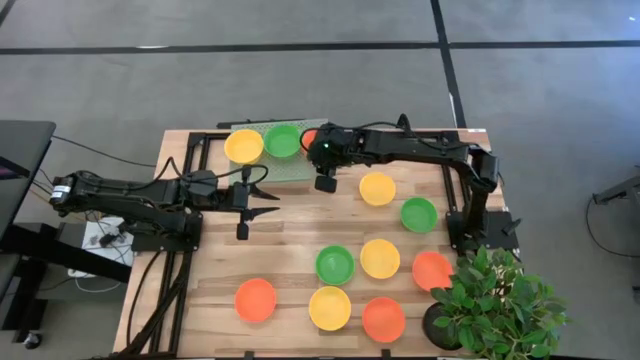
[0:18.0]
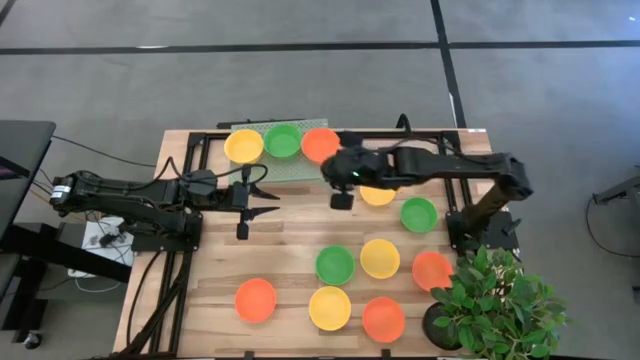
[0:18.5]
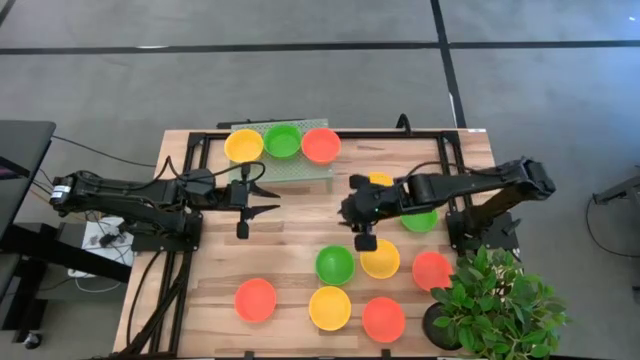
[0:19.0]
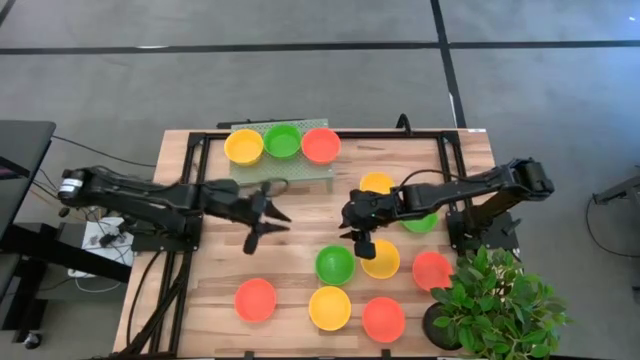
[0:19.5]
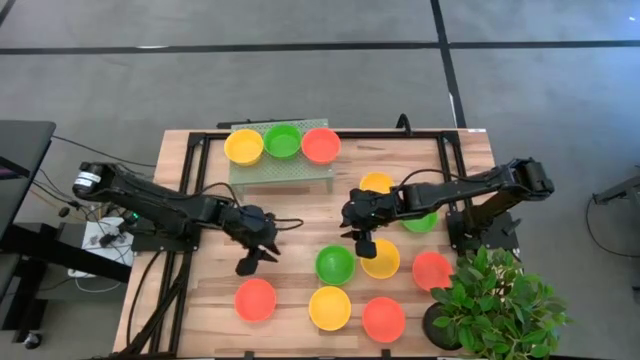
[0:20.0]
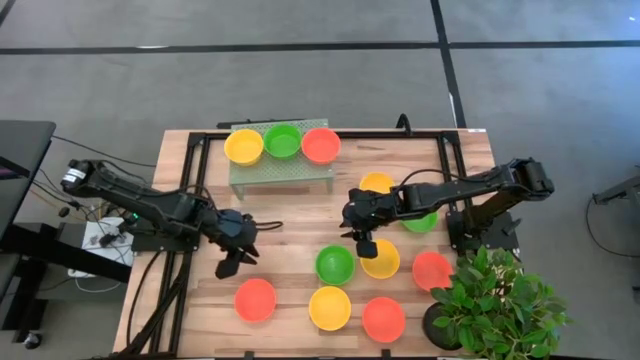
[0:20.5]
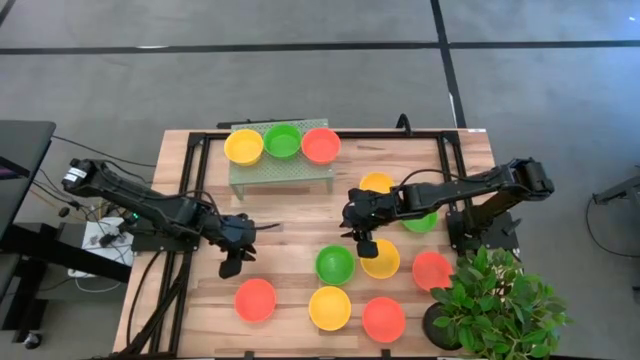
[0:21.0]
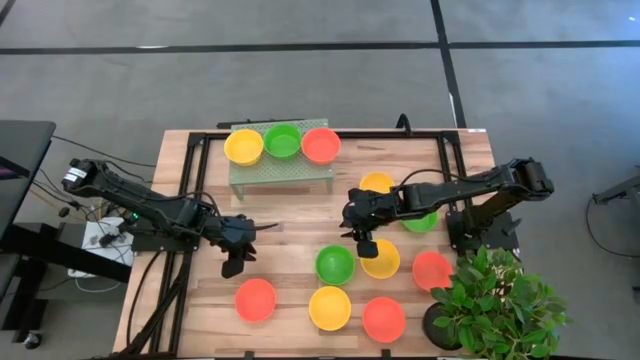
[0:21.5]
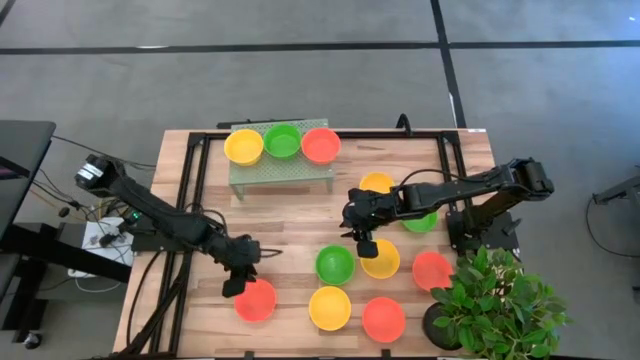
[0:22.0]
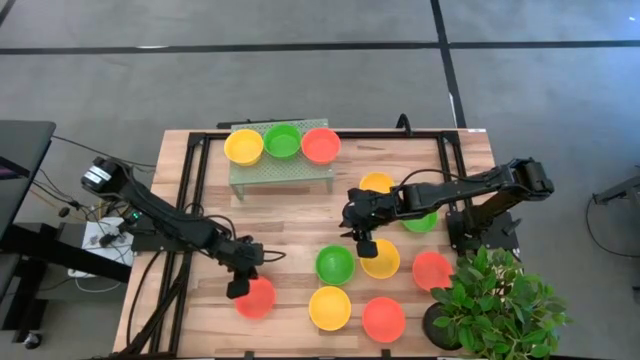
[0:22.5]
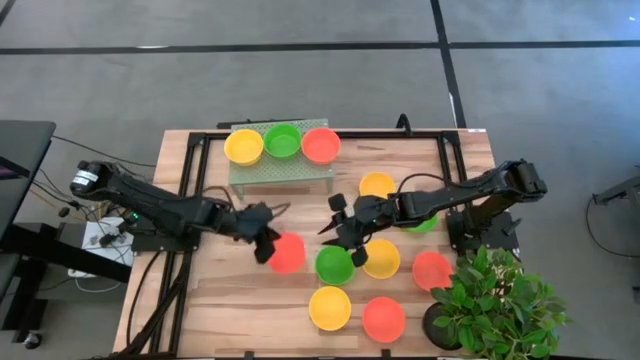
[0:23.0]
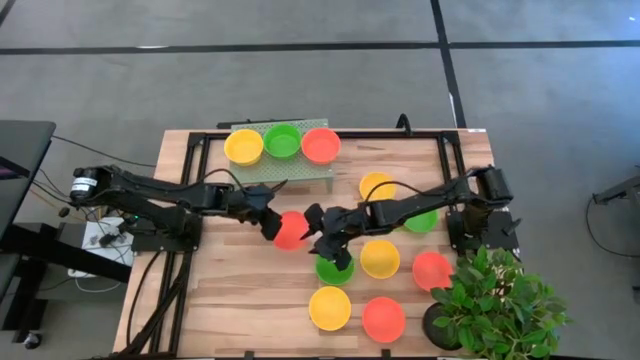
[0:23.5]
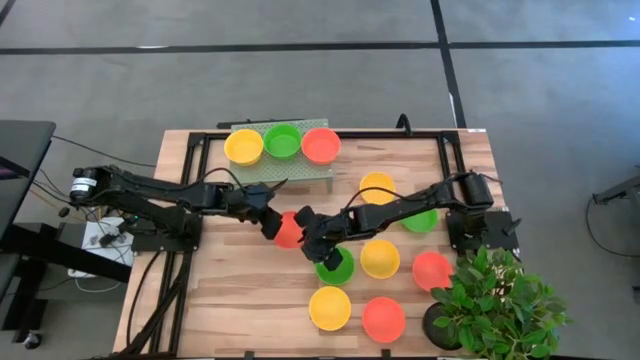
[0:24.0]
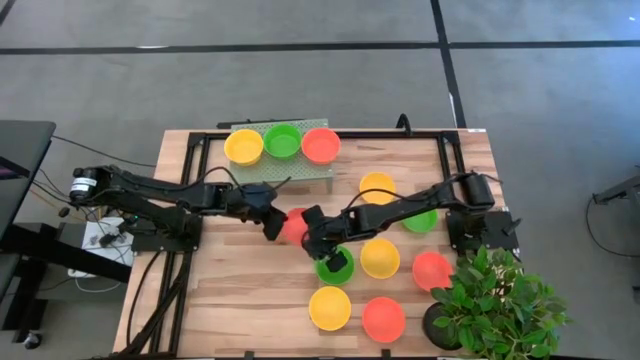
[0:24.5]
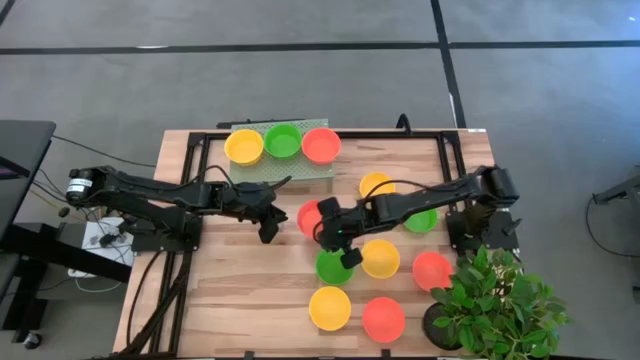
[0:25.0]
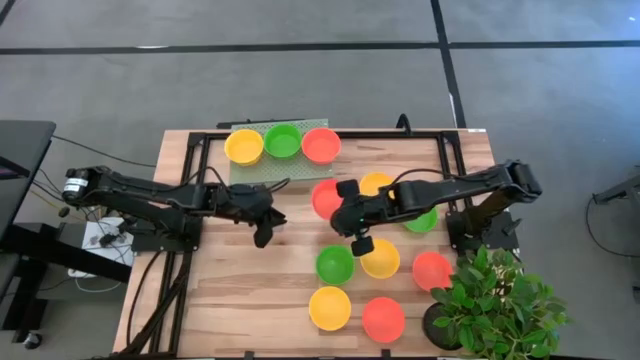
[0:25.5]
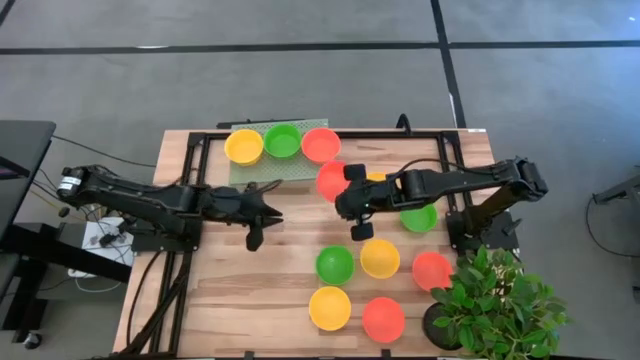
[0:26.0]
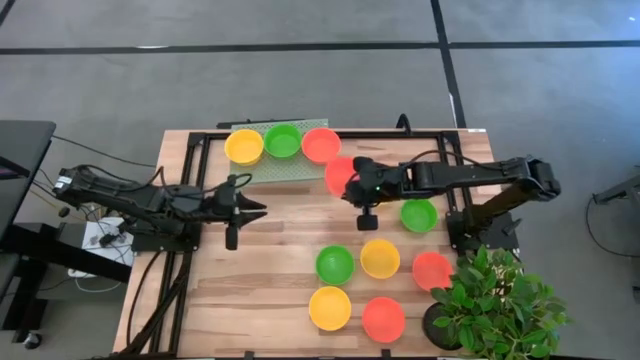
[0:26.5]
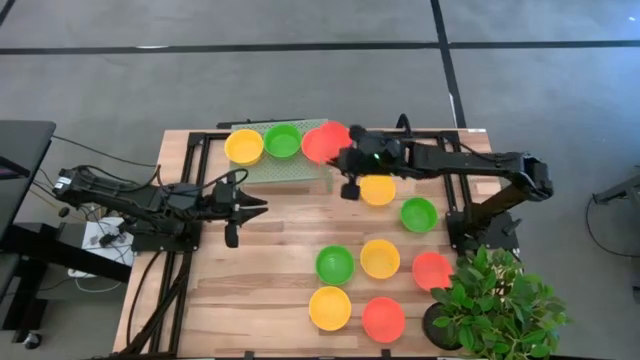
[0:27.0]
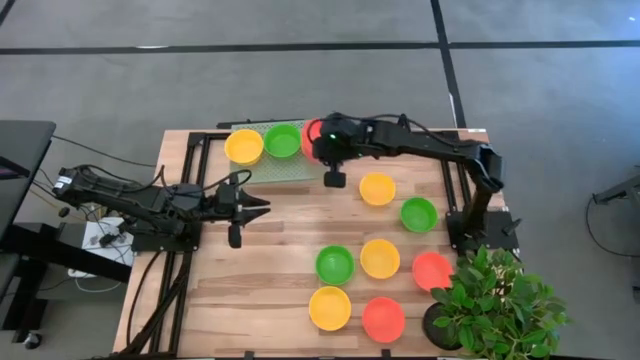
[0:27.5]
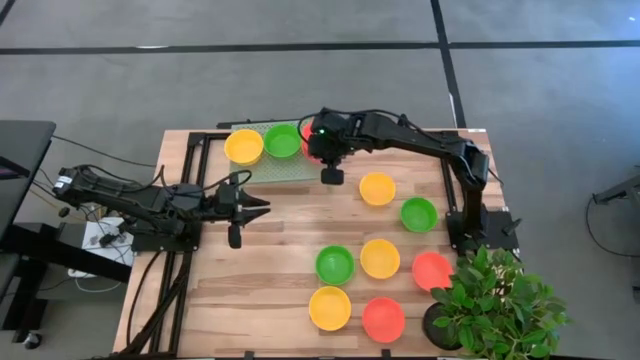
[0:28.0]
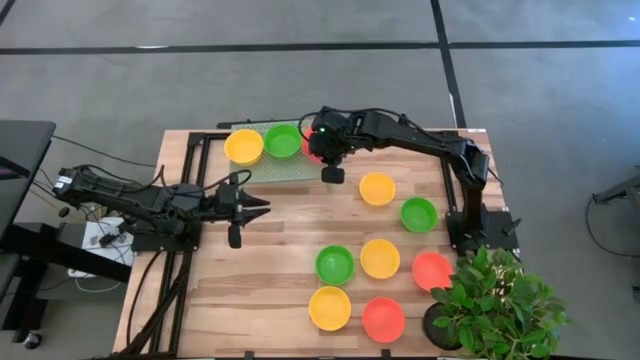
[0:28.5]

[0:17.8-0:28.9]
Task: Pick & Place Mini bowls
Stack the orange bowl on top of the other orange bowl on the shelf

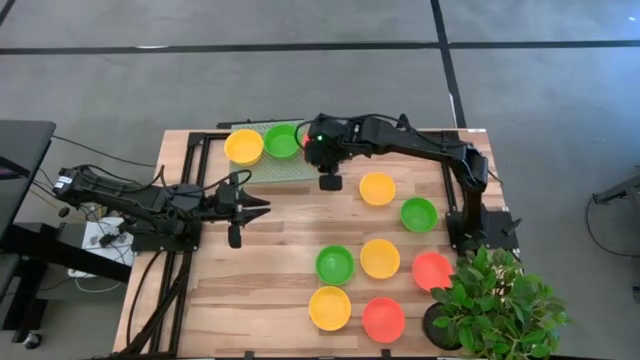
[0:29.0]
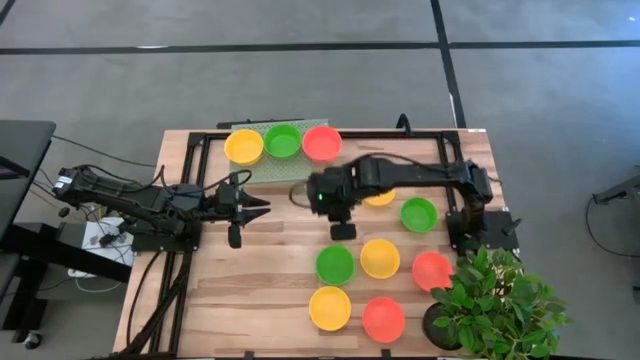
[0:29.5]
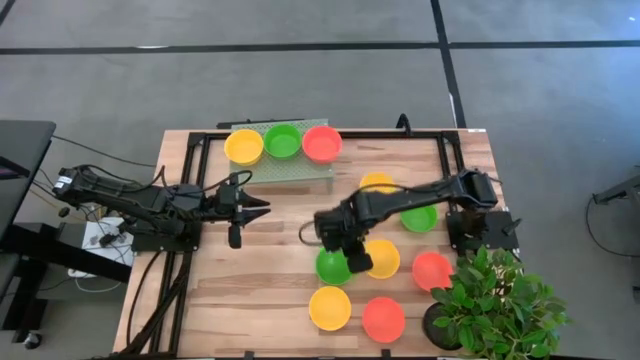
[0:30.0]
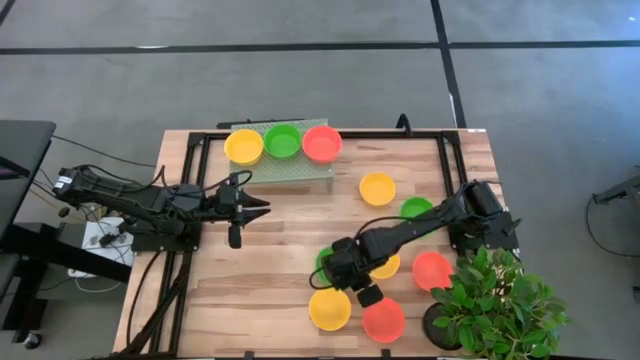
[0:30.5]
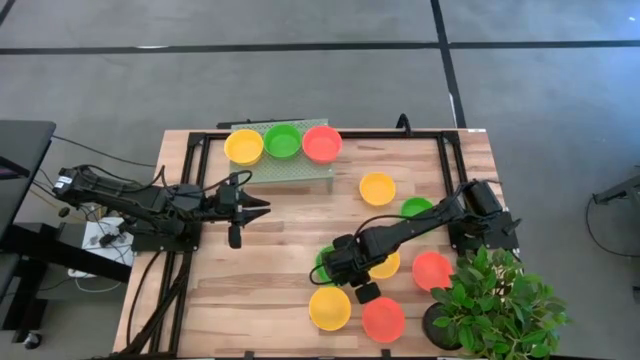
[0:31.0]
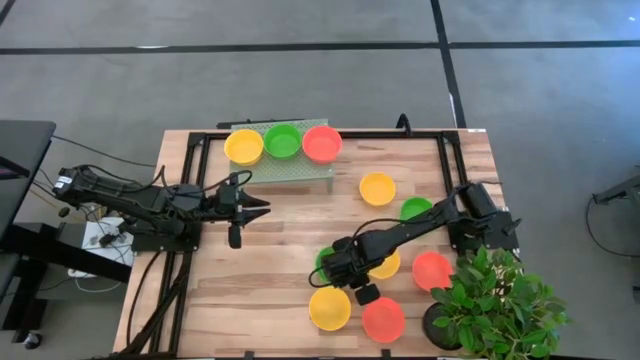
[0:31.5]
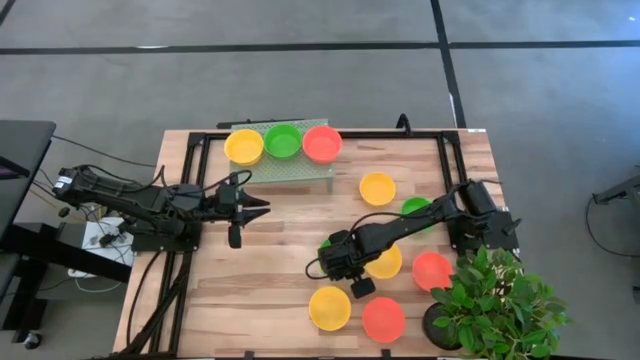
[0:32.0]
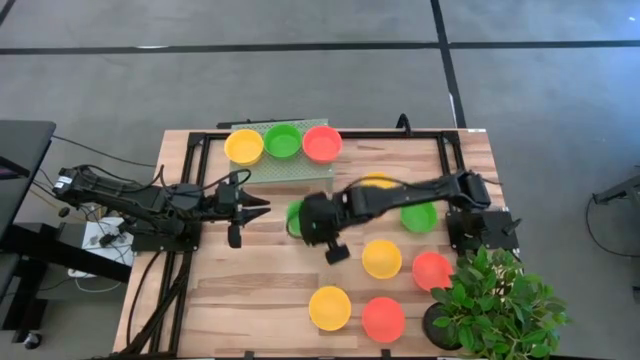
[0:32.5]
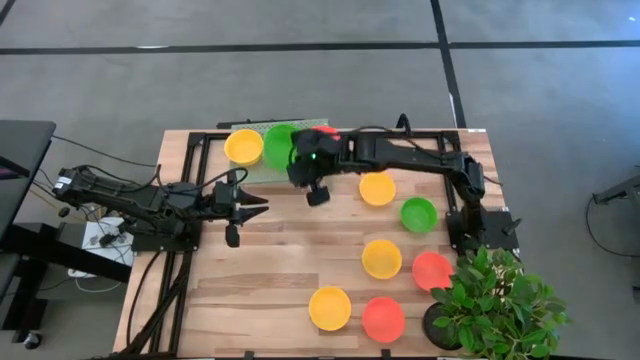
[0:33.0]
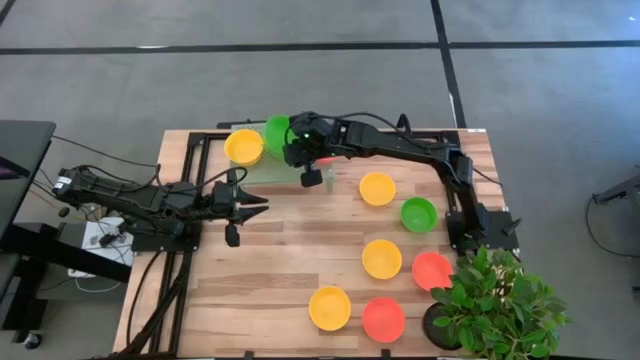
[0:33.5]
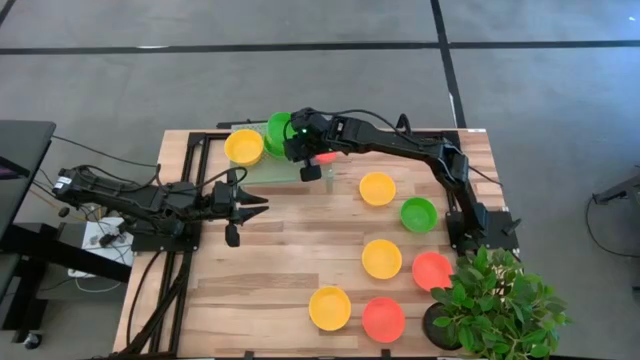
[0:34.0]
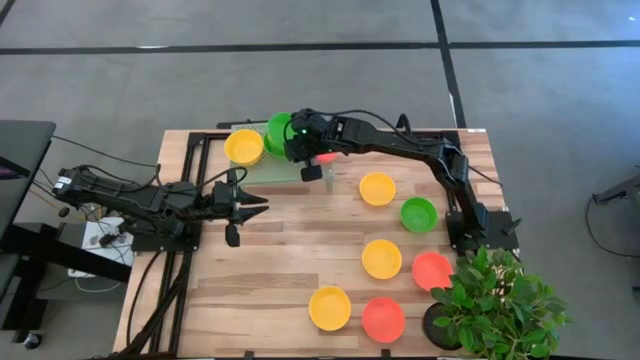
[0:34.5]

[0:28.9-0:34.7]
Stack the green bowl on top of the other green bowl on the shelf

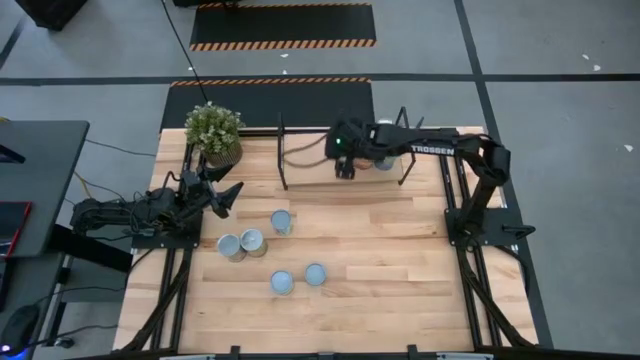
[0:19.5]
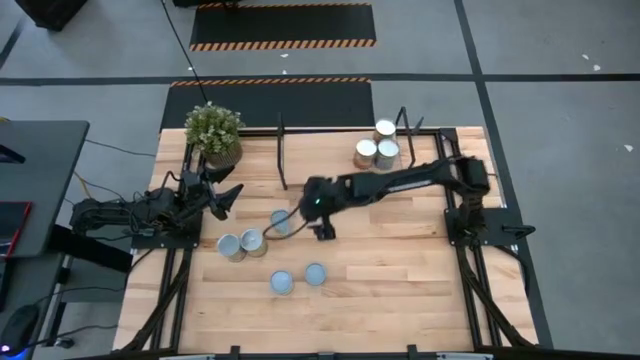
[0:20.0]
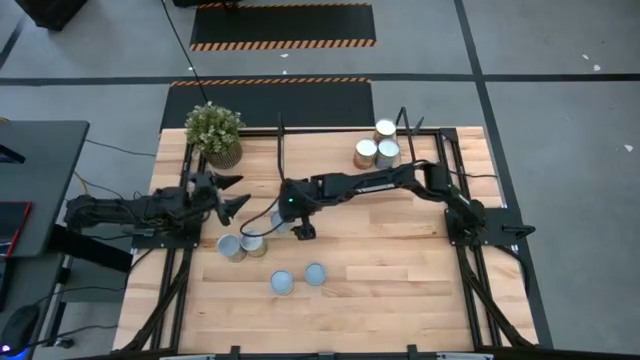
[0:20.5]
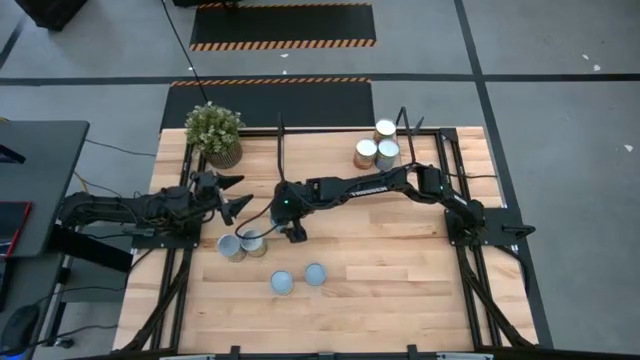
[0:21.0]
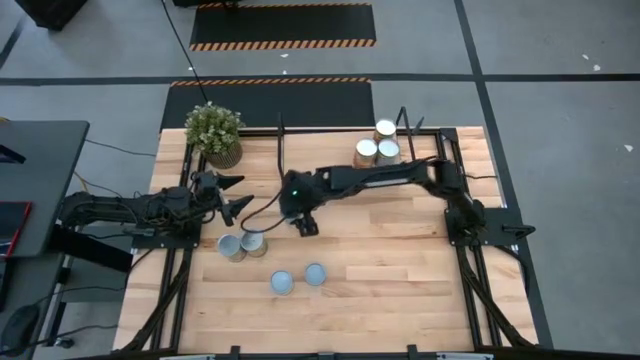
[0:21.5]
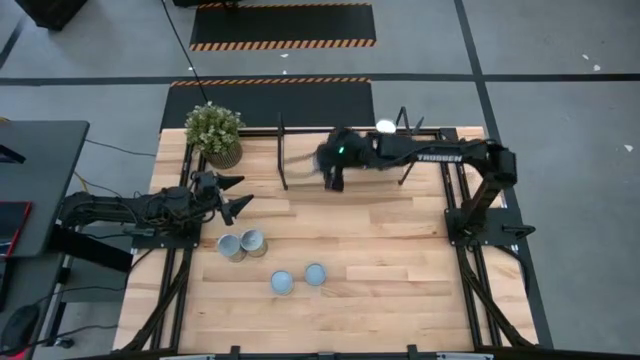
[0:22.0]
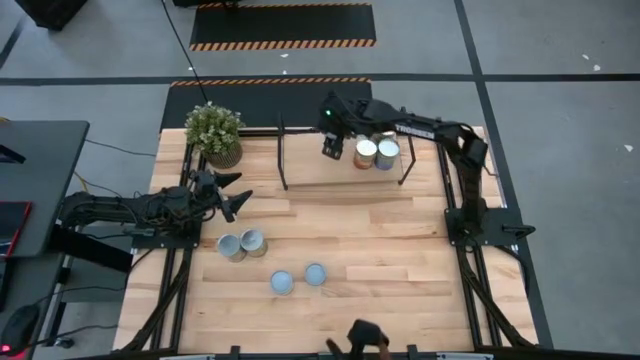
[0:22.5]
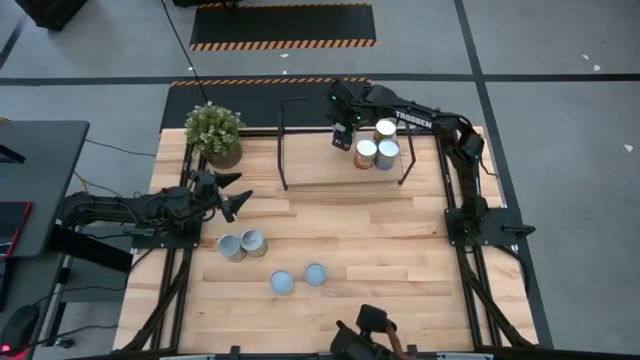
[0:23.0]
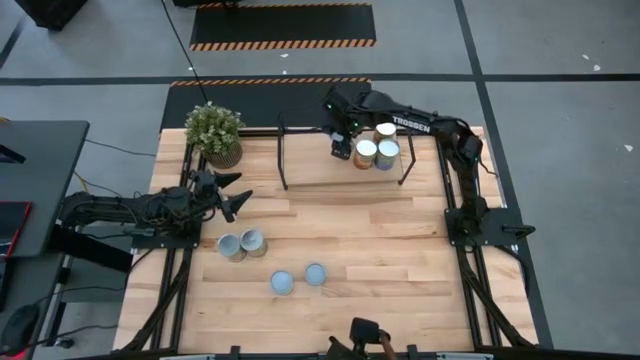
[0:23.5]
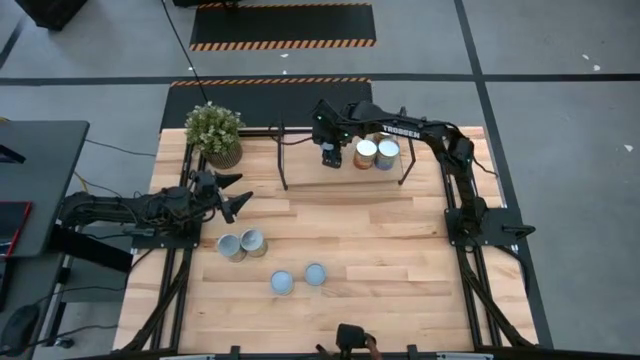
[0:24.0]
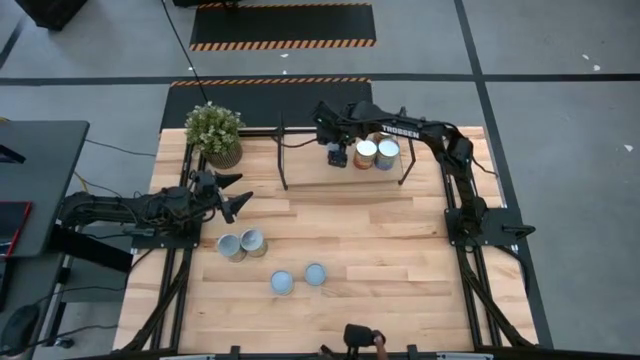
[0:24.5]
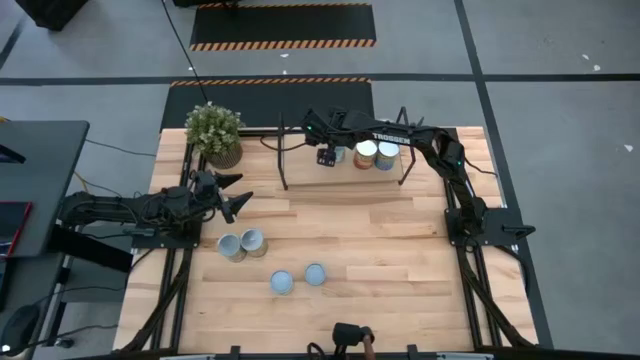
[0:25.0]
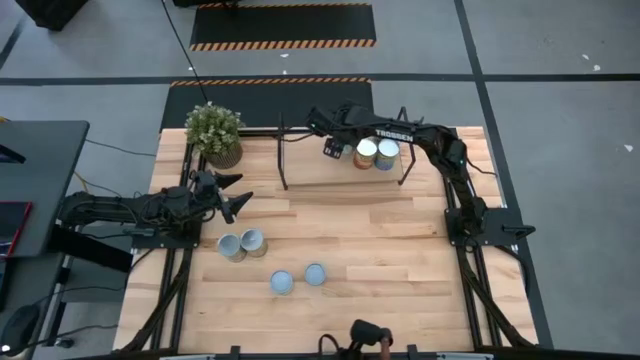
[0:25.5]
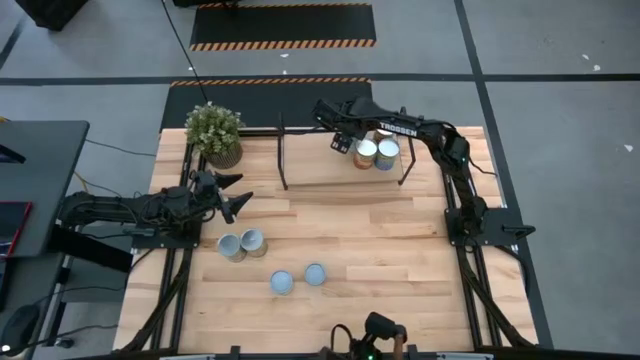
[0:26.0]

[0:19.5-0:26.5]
Task: Pick and place cans onto a shelf
Put the canned mixed vegetables on the shelf
